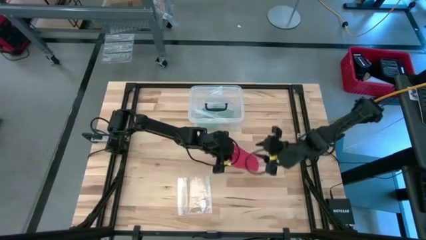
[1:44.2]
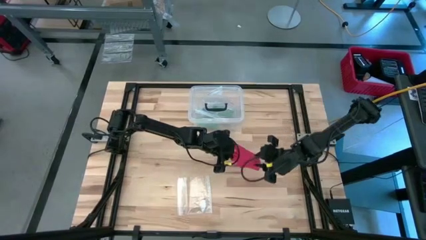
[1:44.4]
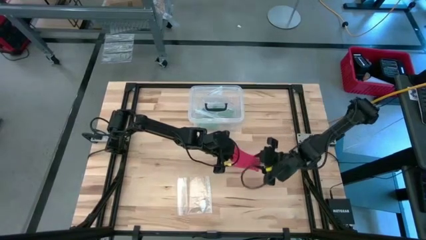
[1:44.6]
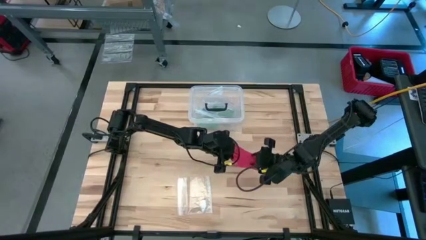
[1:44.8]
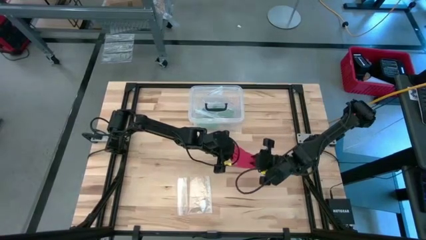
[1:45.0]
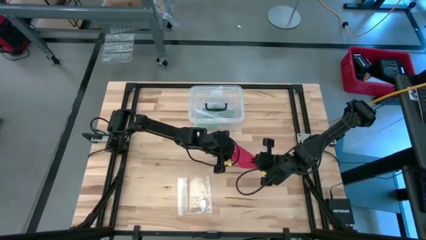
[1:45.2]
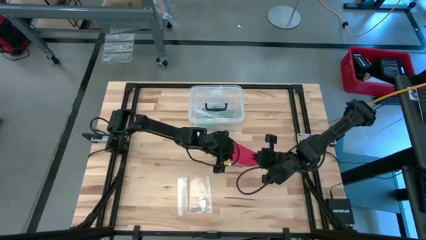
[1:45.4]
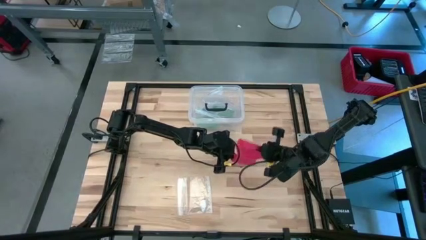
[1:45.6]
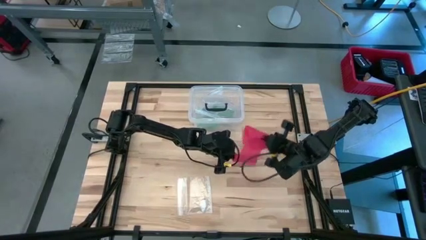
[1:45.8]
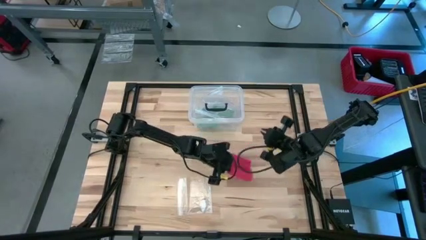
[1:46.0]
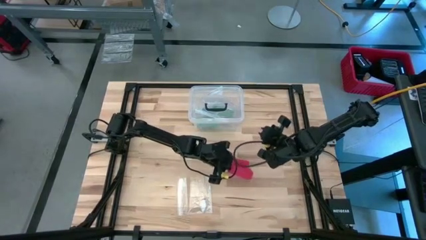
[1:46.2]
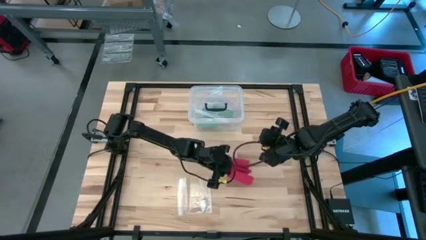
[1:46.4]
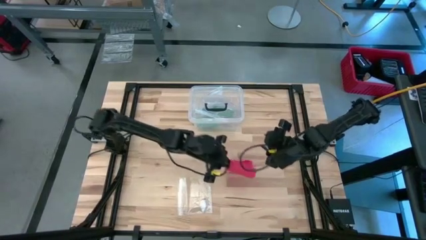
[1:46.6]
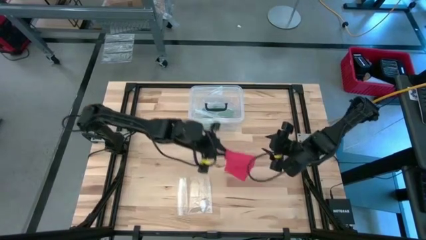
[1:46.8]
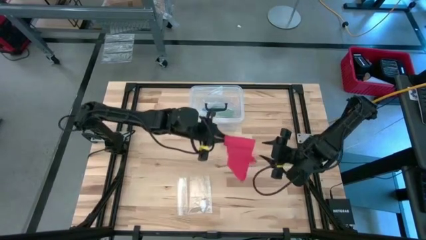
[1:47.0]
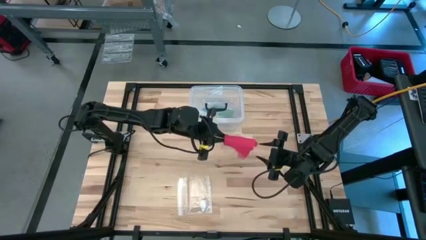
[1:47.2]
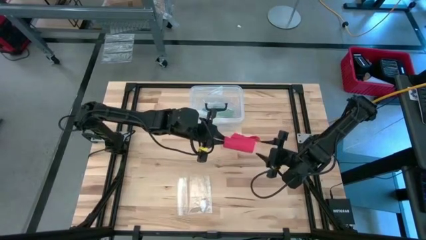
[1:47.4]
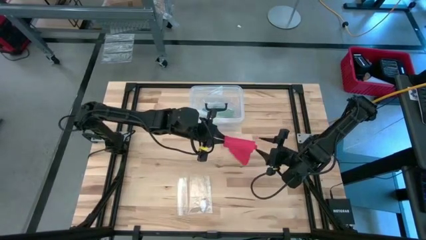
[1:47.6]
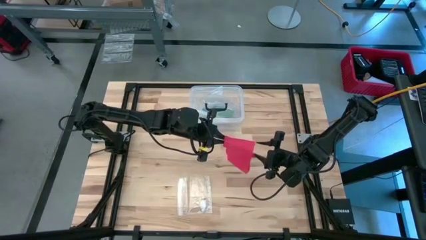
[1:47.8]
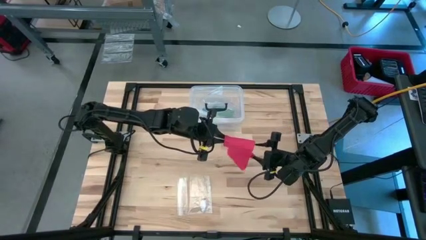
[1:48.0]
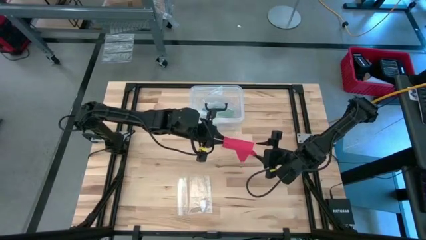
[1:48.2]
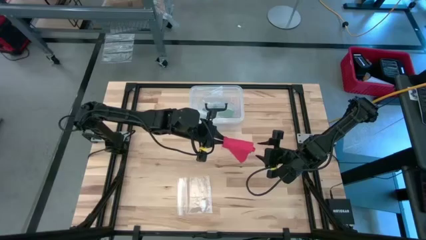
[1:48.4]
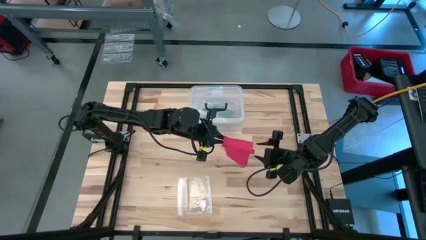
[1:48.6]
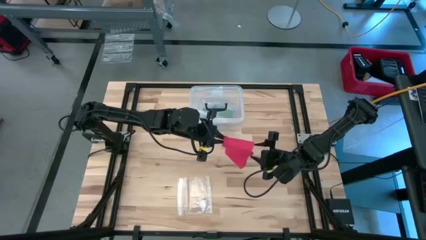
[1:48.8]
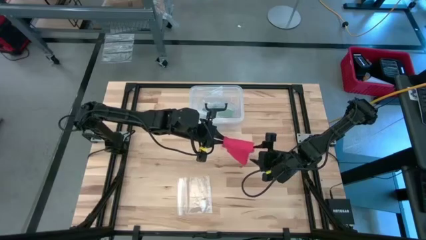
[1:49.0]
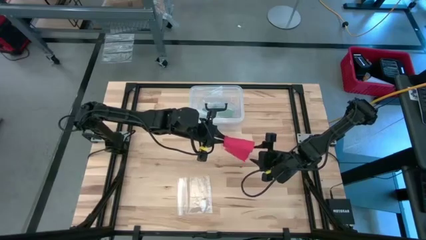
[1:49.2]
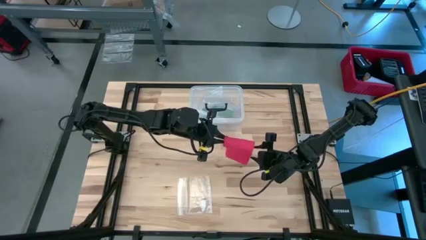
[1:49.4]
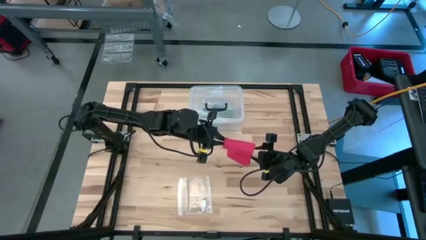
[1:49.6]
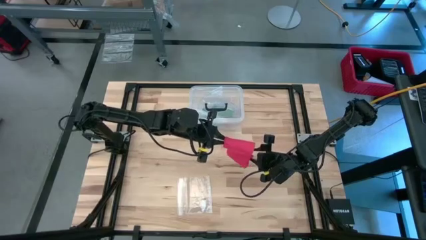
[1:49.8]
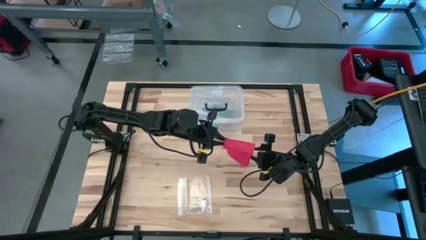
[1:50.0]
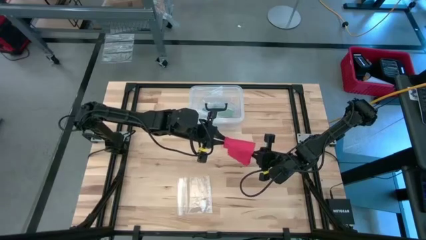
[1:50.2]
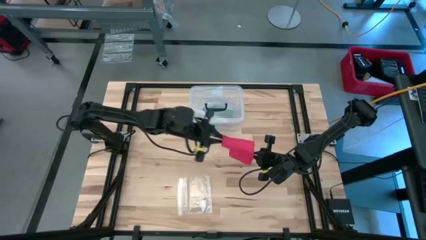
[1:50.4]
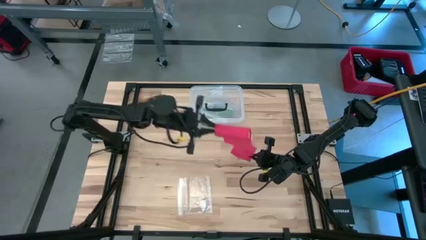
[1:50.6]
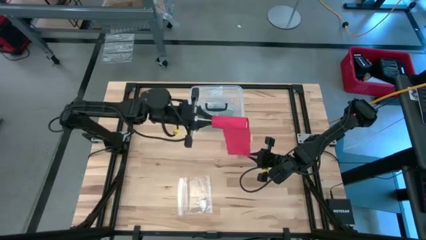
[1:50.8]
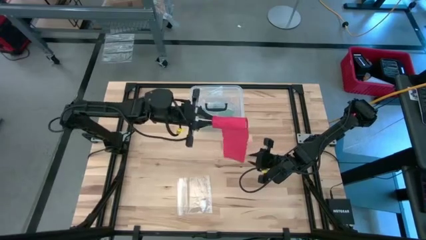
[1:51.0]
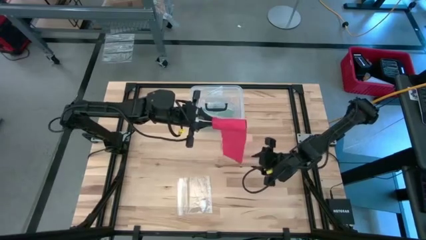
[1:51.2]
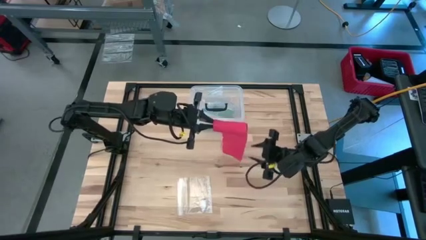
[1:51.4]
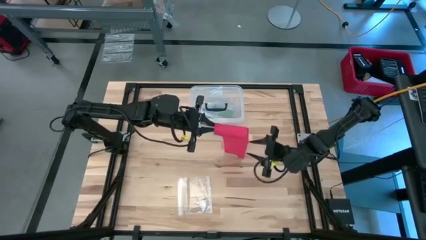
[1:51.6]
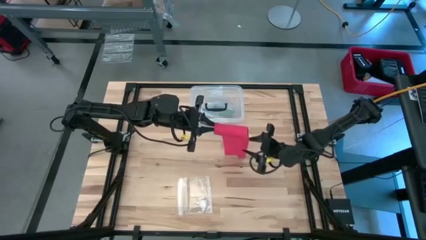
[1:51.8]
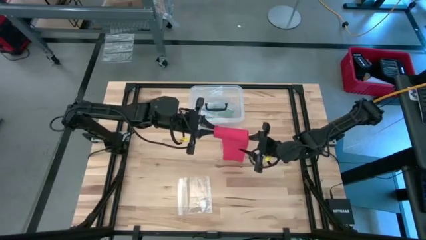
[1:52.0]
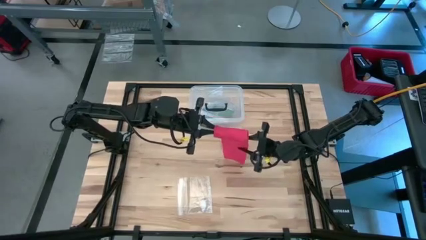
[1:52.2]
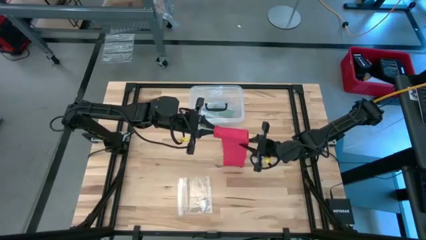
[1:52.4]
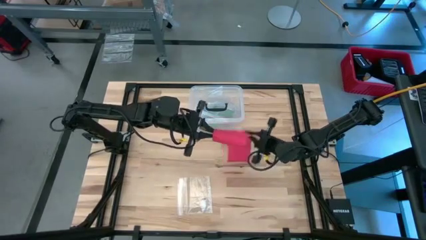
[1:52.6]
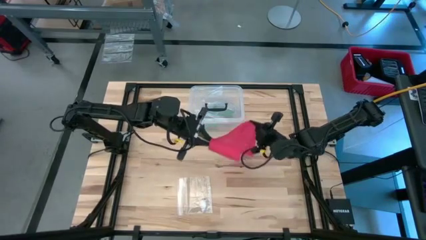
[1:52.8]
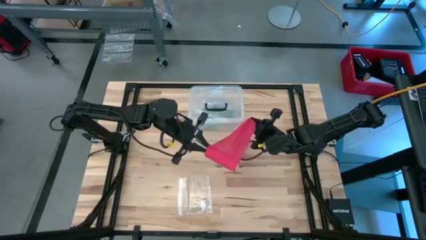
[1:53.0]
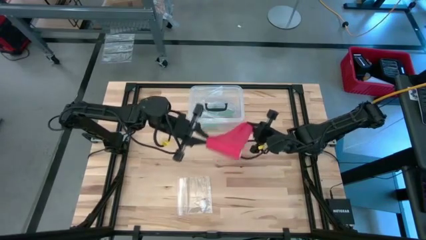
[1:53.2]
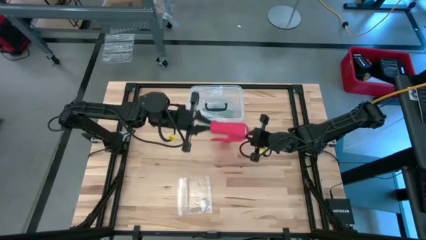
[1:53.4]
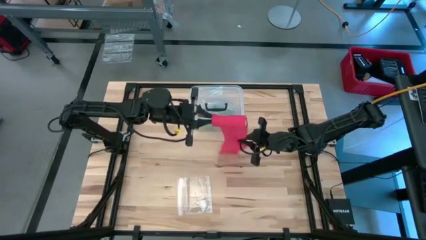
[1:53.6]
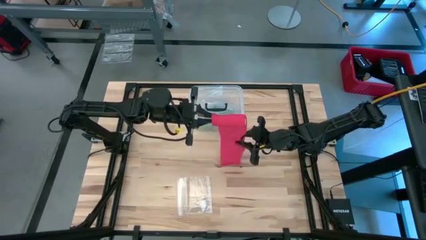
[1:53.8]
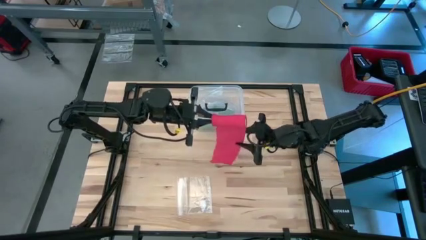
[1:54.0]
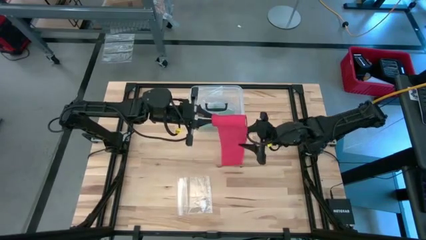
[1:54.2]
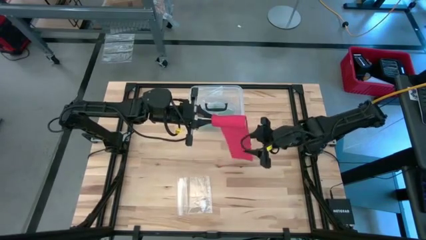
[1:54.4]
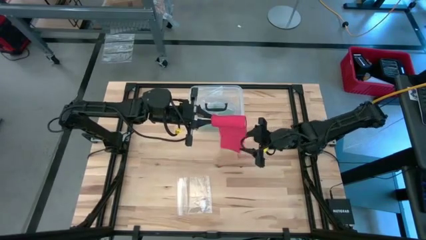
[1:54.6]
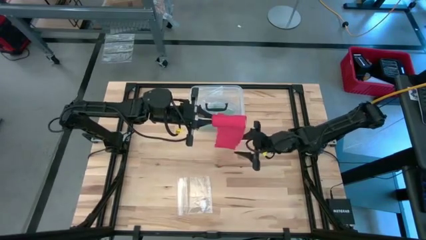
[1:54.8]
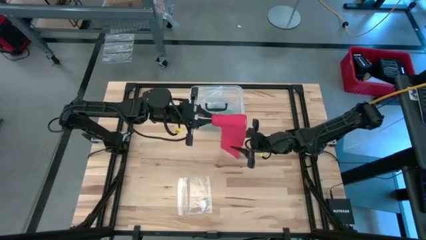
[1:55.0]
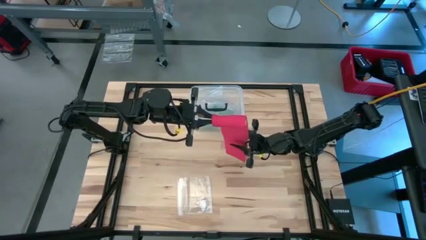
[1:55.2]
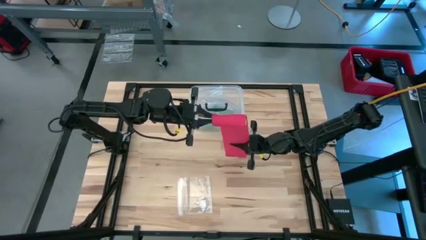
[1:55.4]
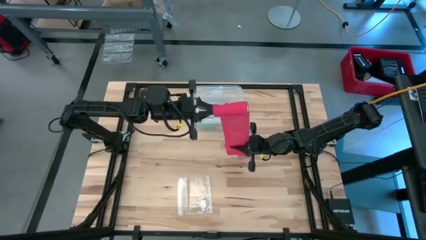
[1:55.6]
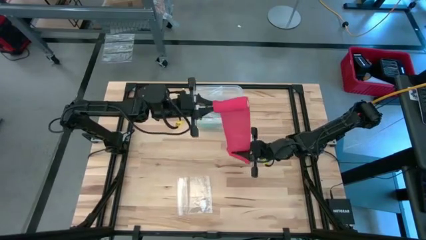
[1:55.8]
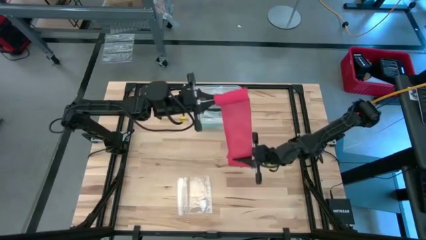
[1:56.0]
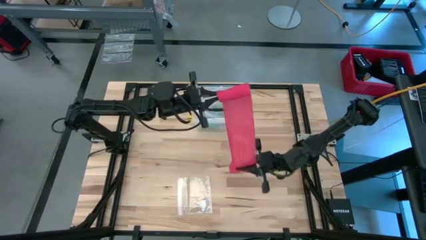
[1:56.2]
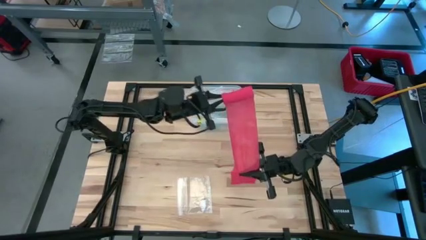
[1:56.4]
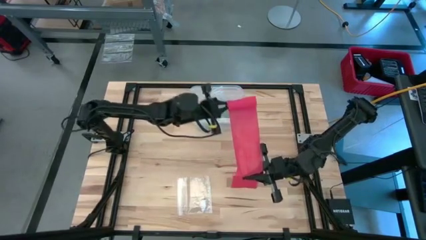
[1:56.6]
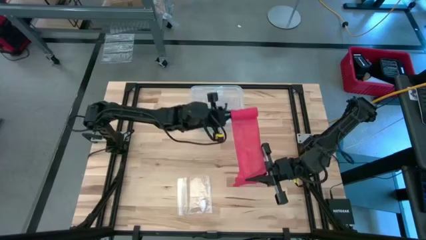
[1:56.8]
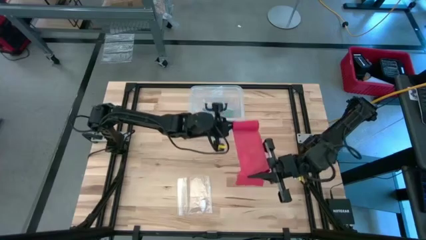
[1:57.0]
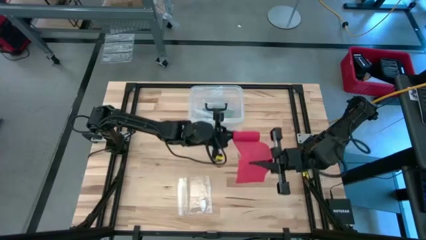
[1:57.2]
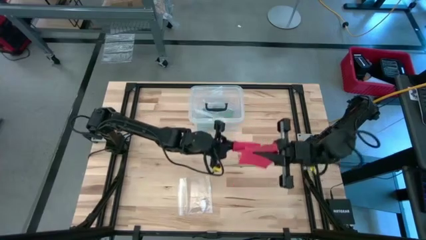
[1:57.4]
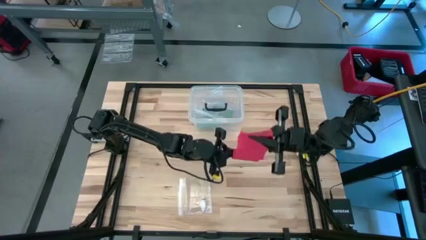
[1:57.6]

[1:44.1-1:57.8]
Task: Roll bandage
Roll the red bandage

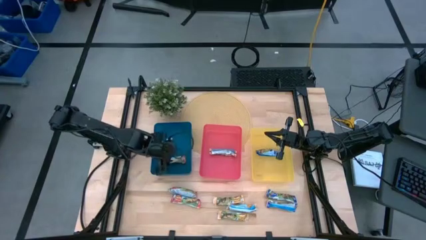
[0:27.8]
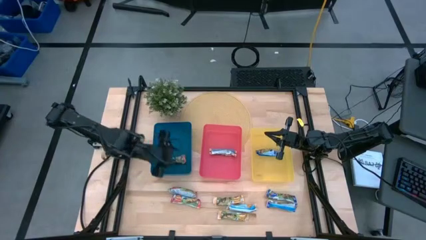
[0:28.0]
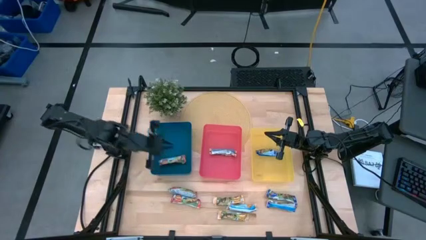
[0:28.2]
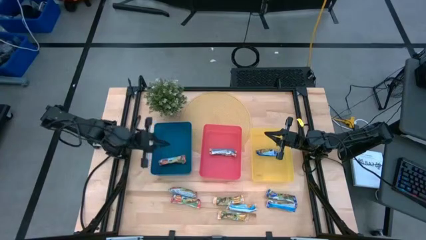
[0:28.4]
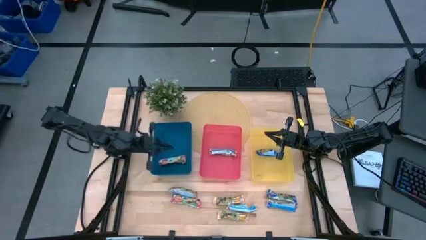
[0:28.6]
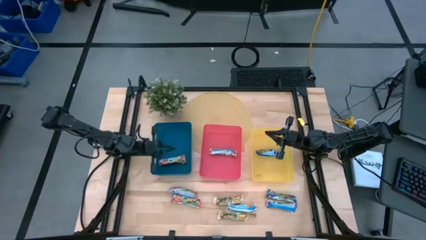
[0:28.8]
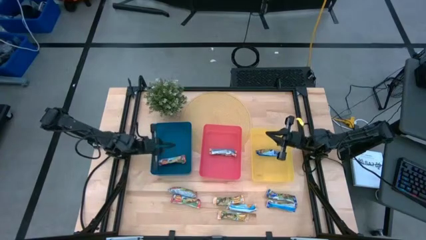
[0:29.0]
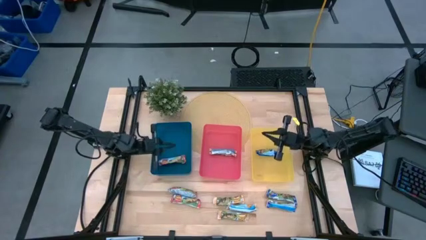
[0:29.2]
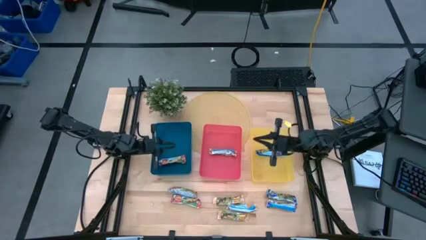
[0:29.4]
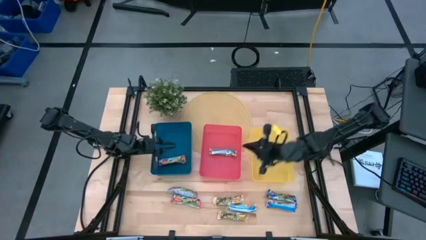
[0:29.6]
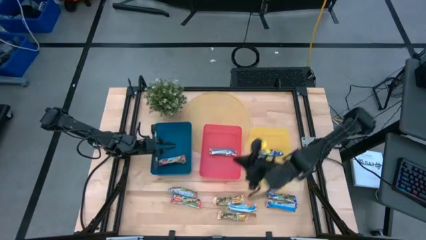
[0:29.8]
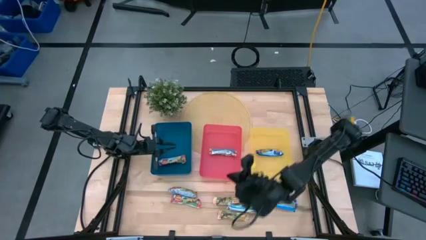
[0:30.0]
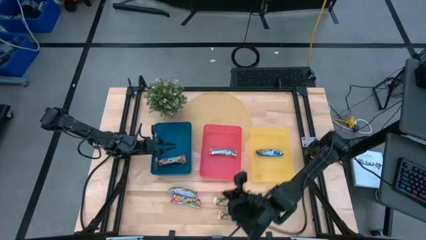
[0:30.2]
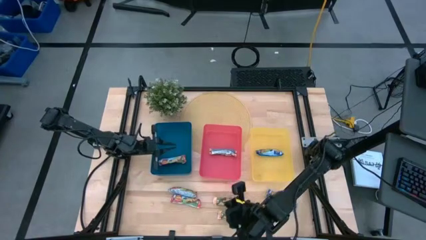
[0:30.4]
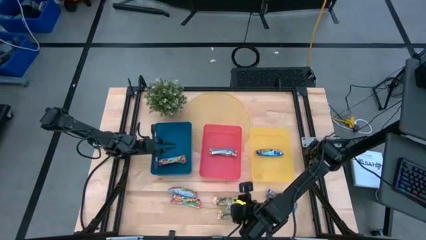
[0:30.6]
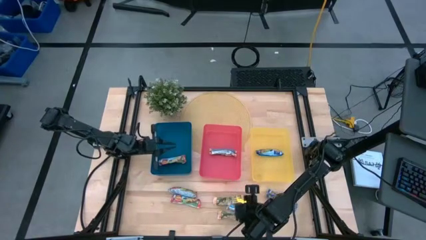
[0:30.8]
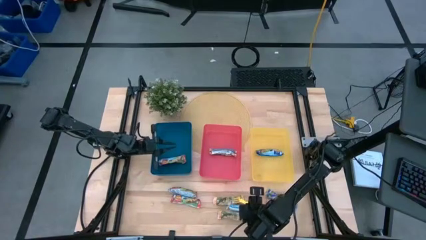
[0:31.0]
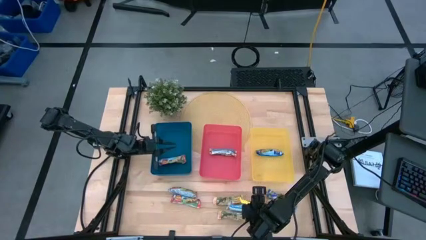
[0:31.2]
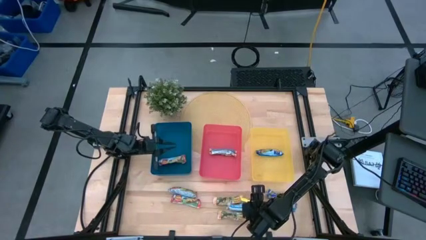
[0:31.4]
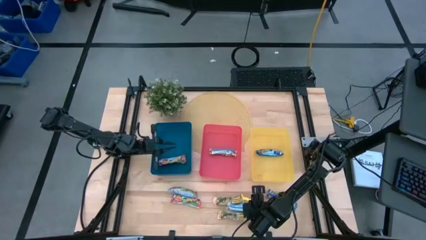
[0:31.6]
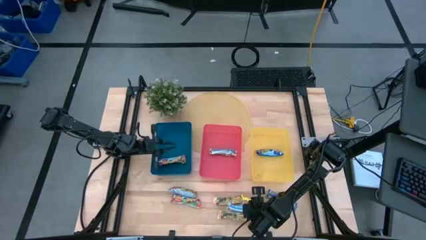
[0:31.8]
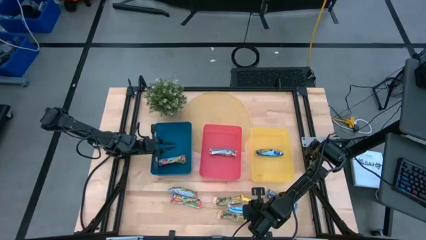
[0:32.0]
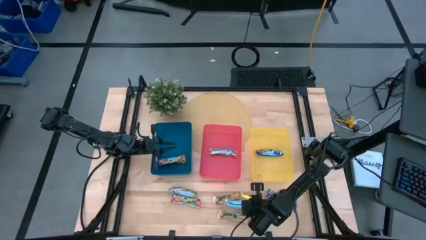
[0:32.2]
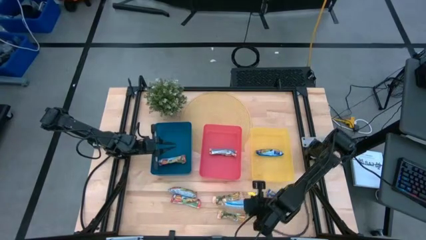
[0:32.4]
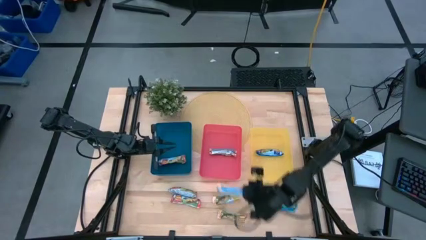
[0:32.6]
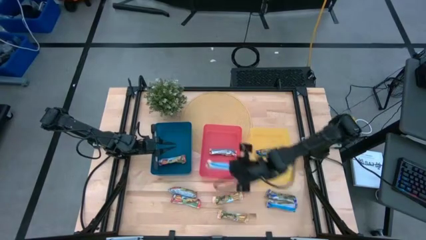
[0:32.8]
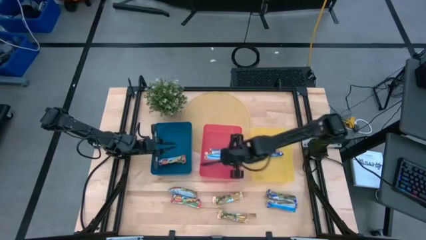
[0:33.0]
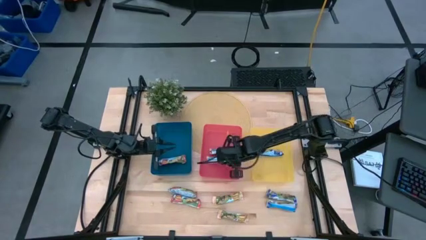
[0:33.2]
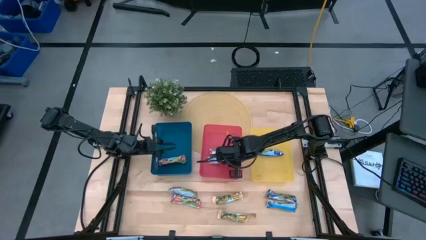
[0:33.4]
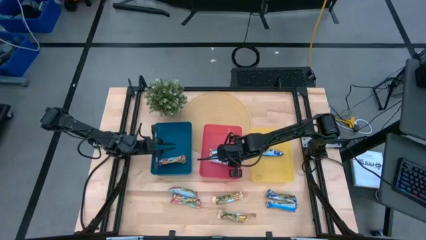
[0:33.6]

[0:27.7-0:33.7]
Task: Pick and place Granola Bars by type
Put the blue granola bar into the yellow bin
